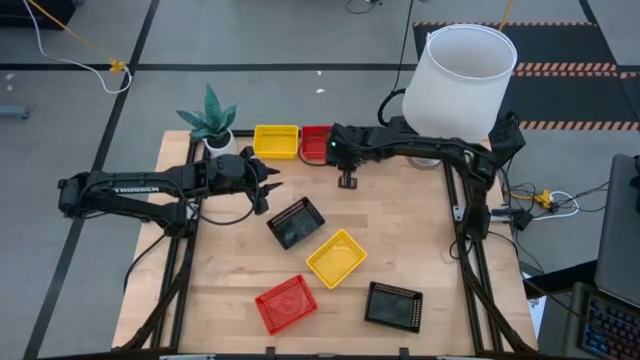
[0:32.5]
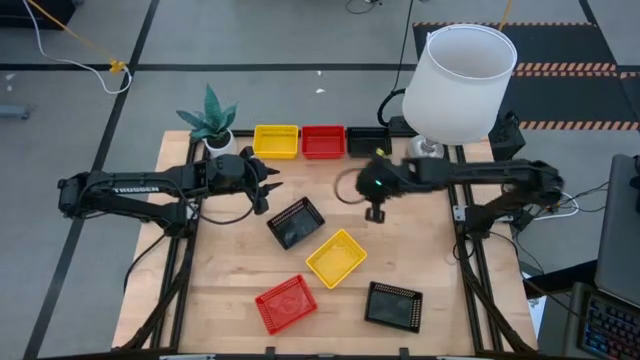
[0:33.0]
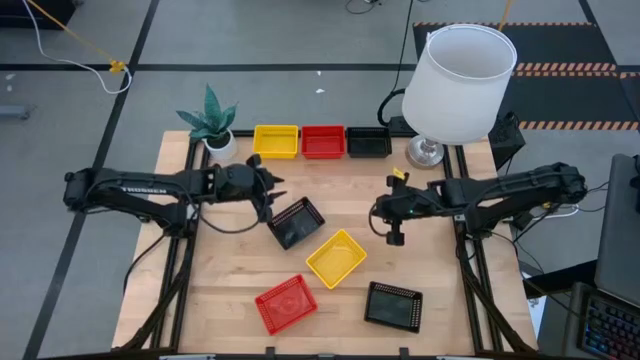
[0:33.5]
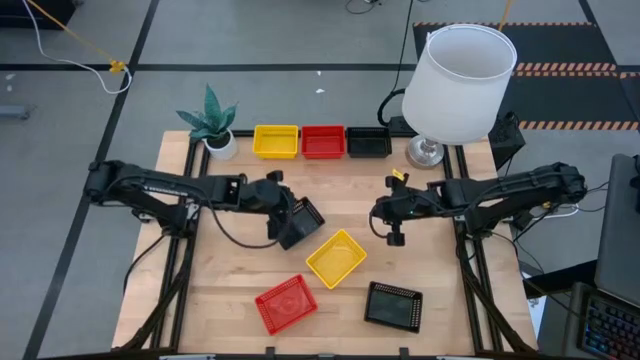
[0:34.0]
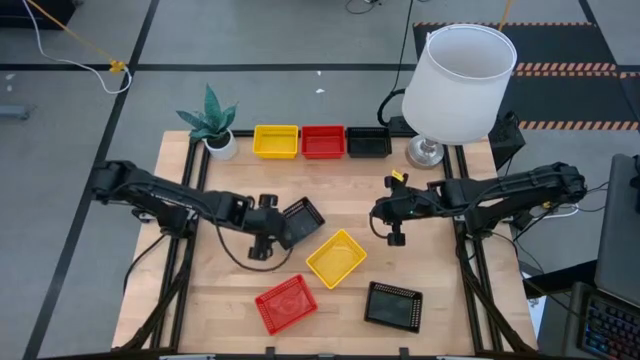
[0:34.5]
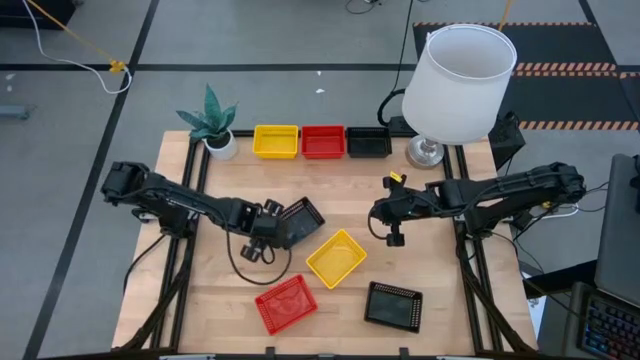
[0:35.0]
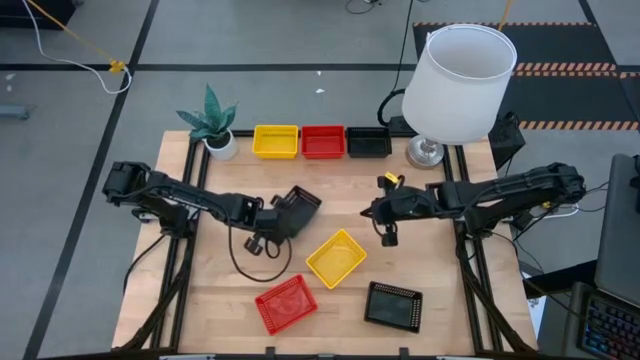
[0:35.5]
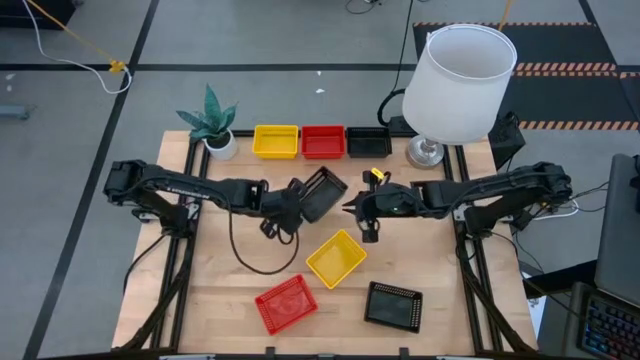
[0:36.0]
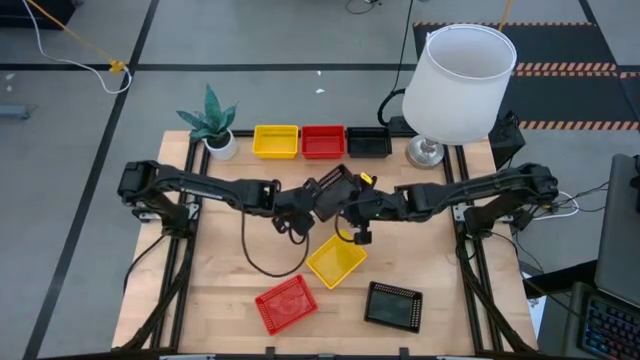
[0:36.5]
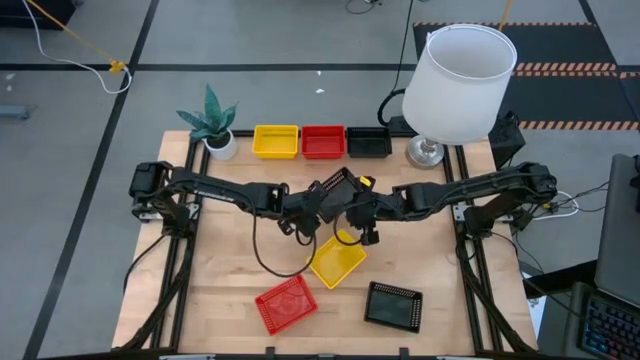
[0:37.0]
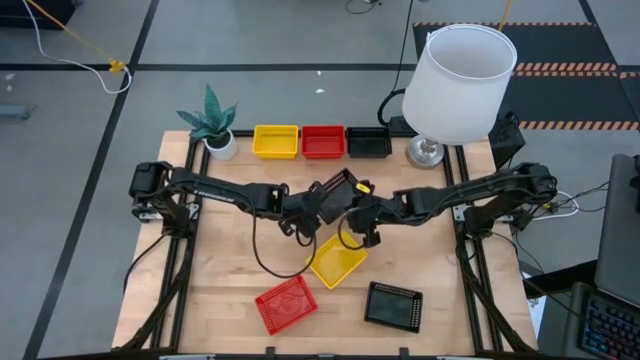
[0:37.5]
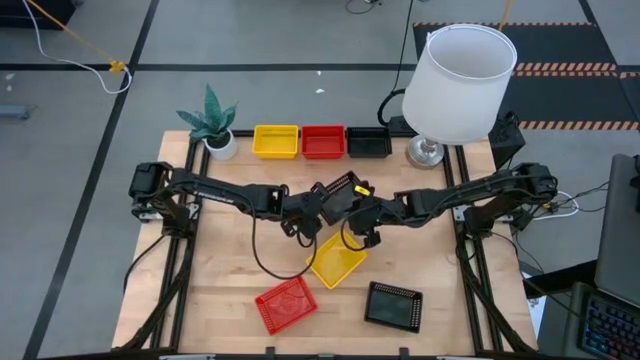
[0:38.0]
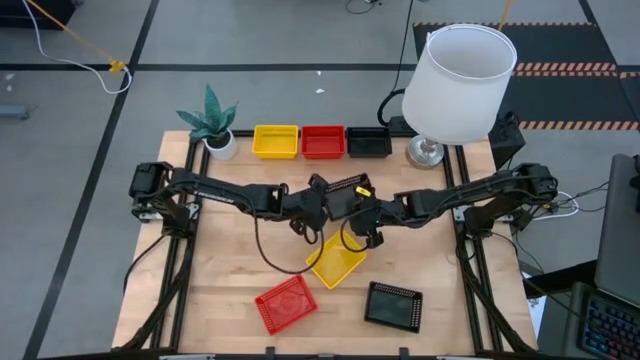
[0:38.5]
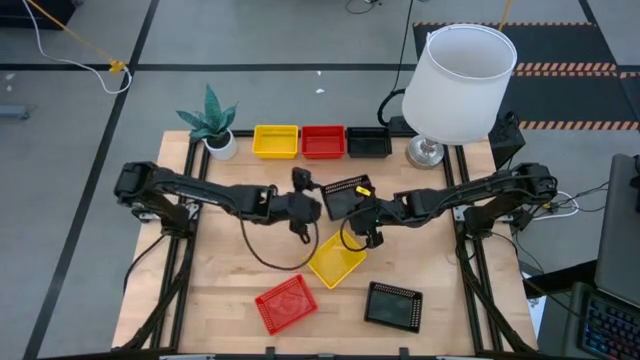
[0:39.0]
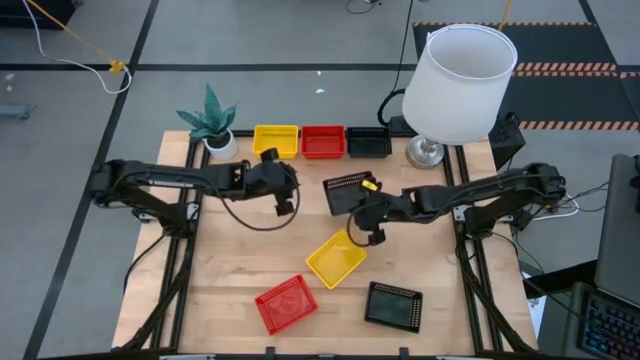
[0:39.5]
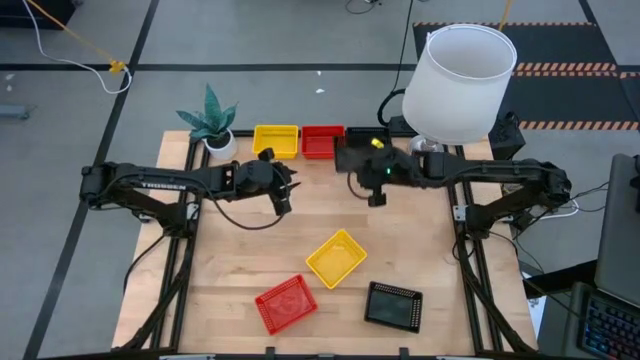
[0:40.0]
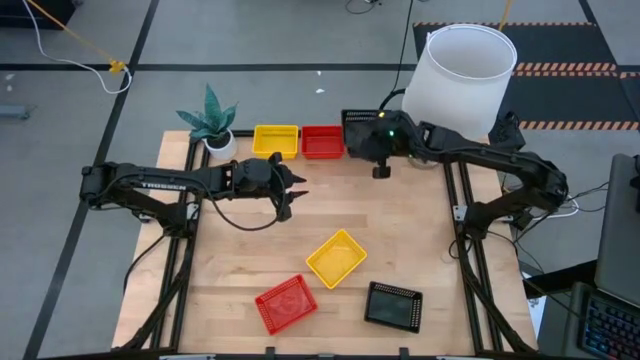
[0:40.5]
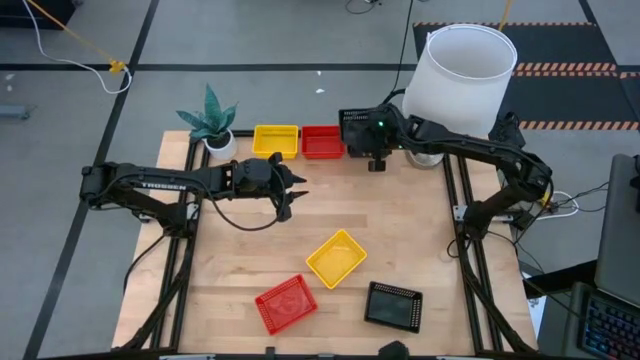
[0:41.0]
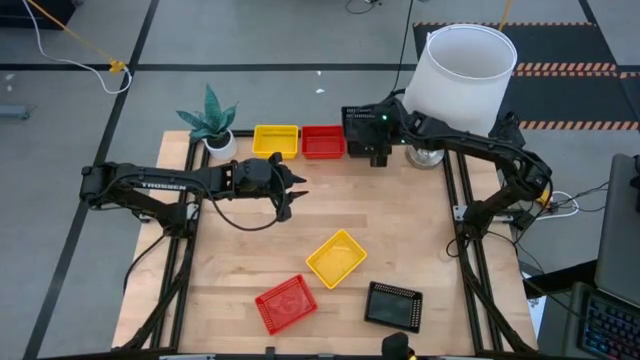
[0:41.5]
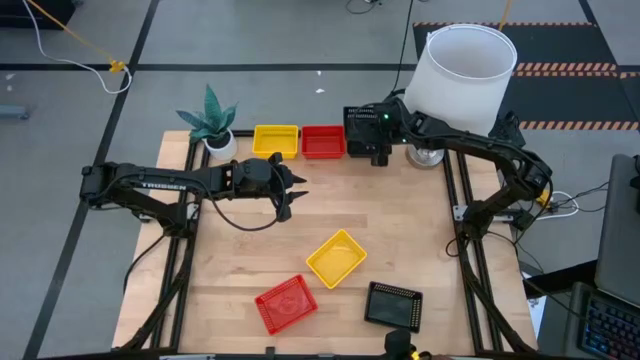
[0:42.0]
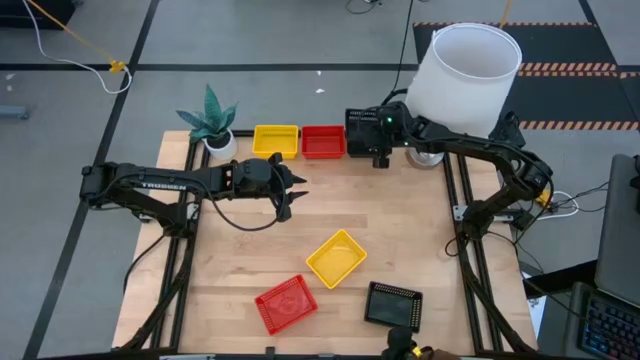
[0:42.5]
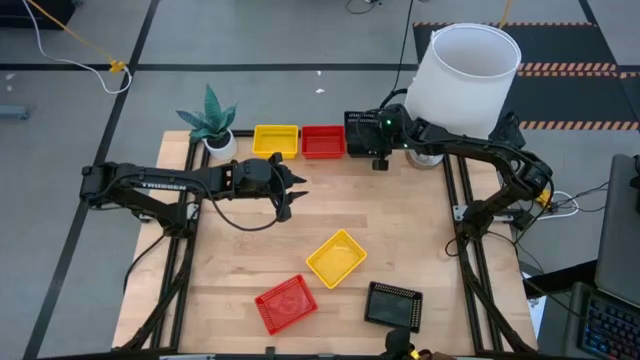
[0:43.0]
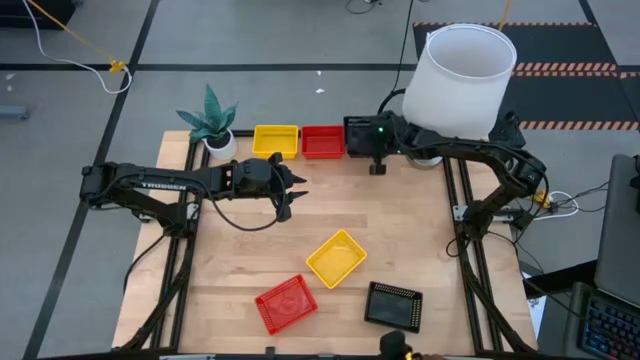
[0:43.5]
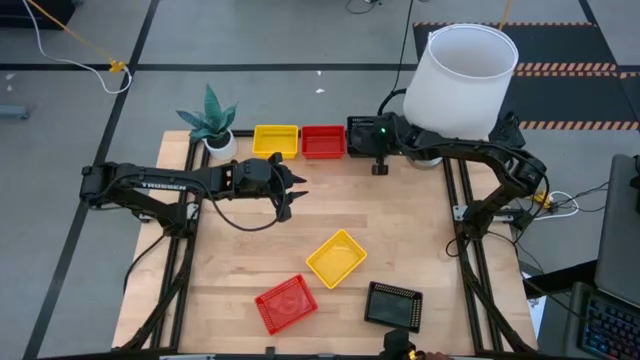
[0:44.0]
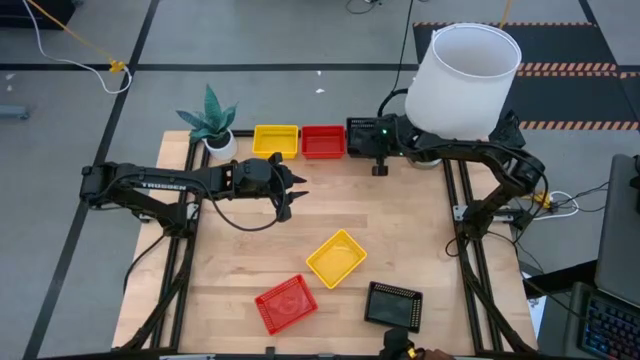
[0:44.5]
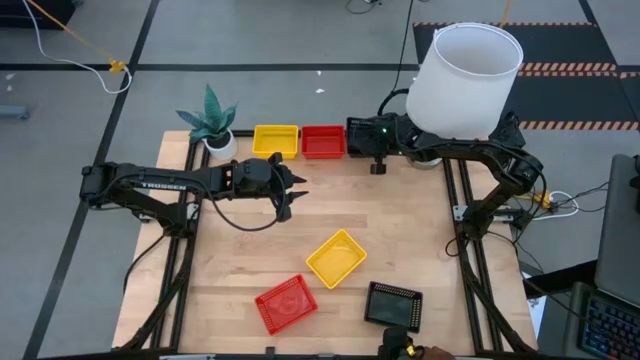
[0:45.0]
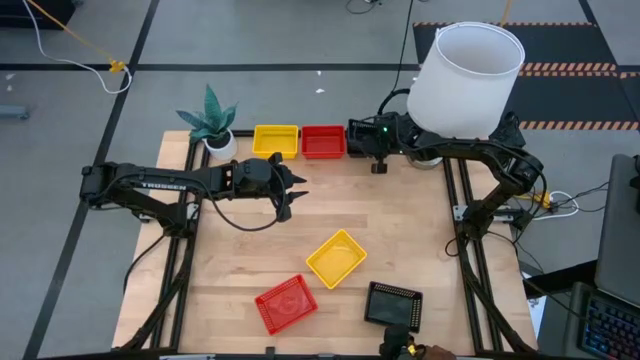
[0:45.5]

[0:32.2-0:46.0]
Stack the middle black bin on the top black bin
